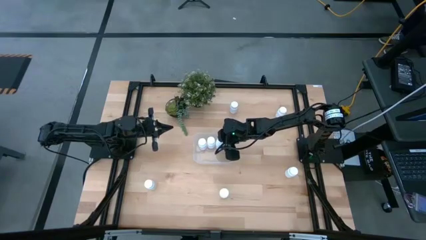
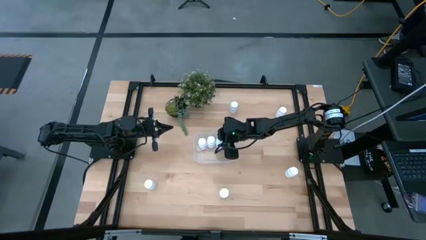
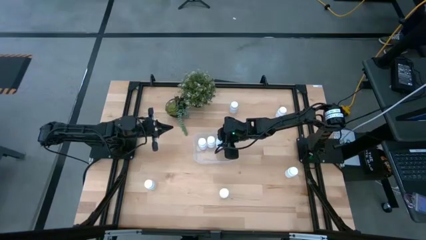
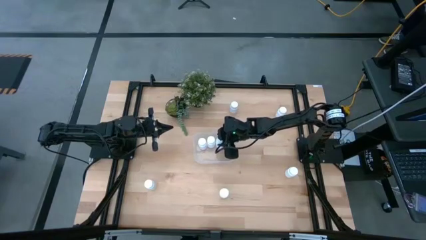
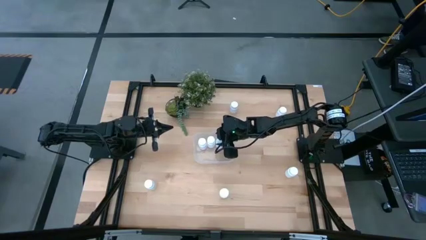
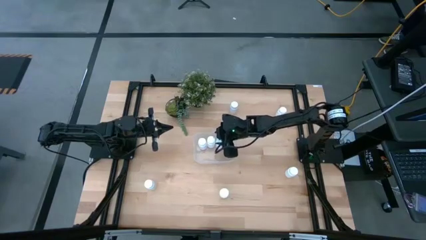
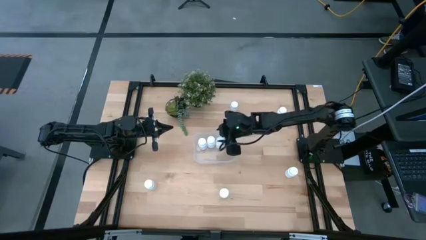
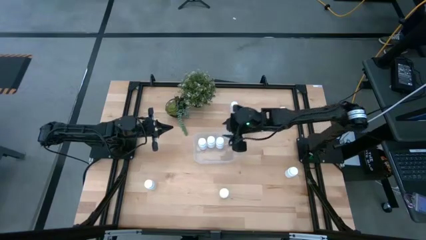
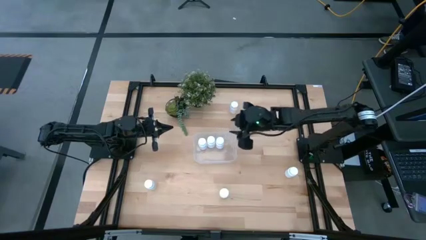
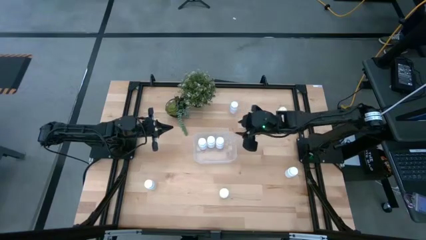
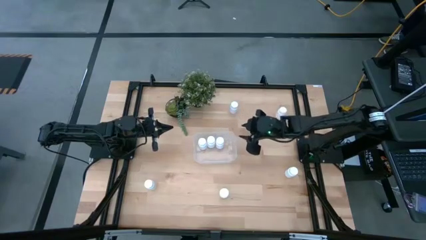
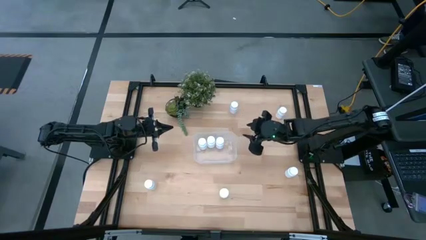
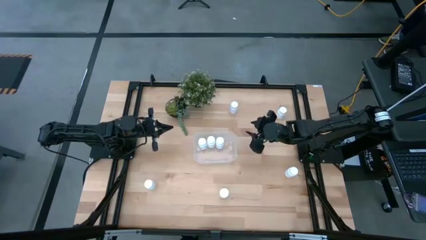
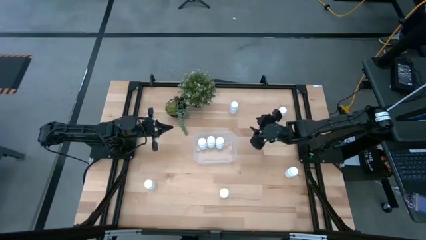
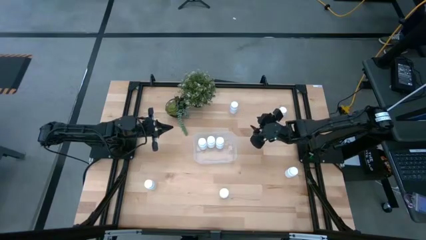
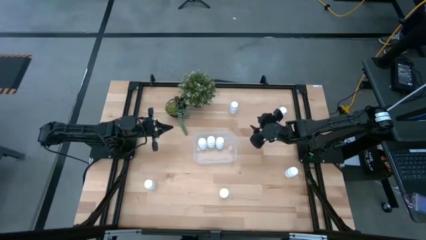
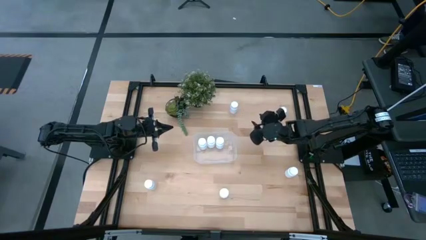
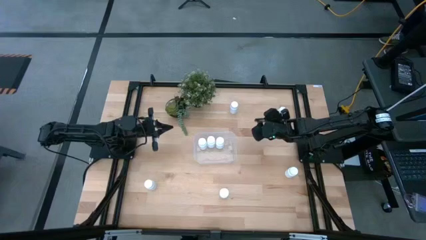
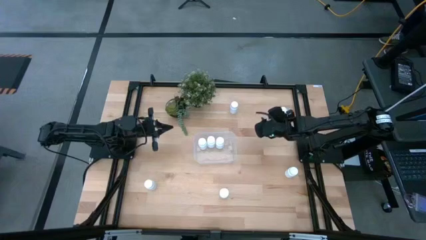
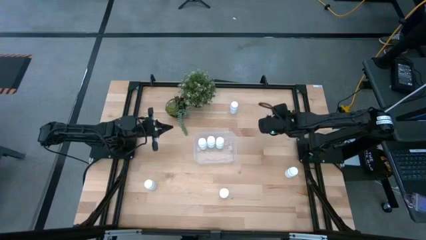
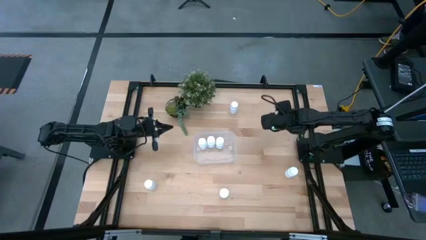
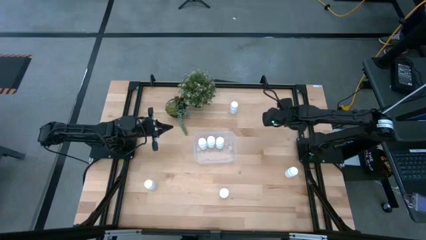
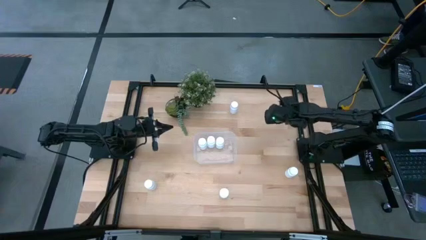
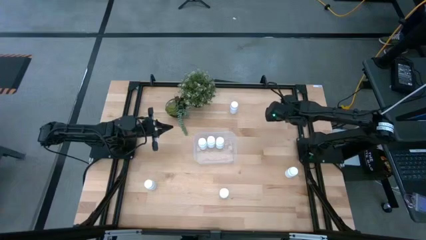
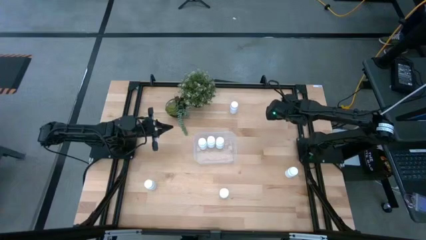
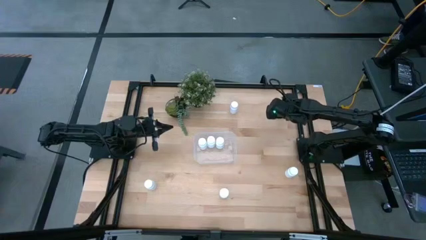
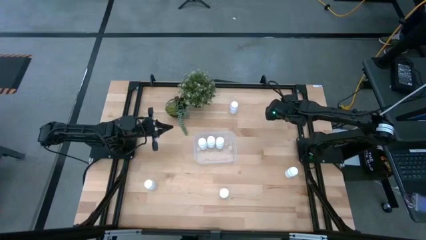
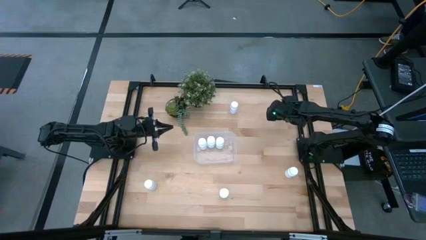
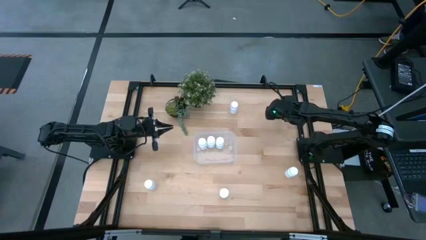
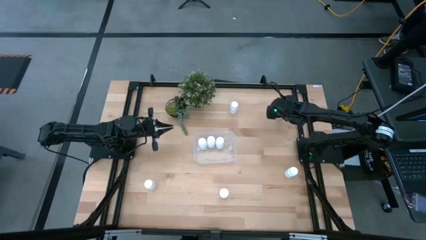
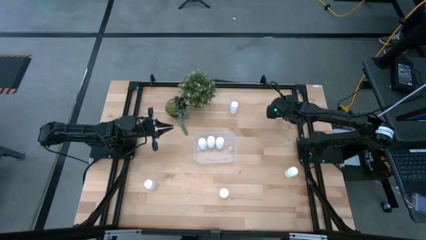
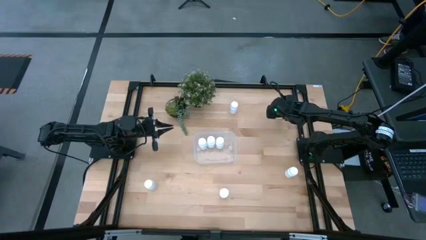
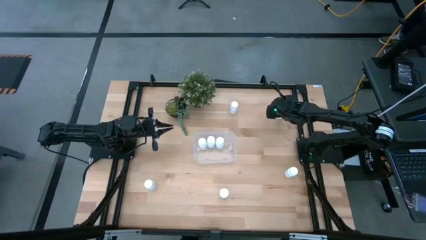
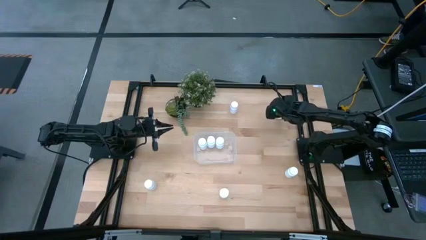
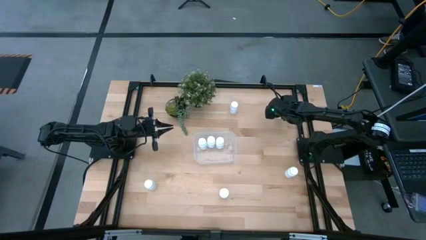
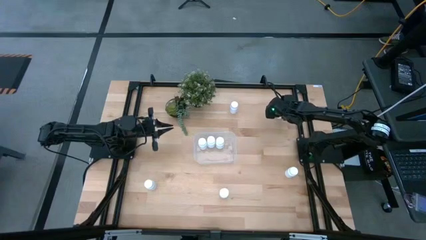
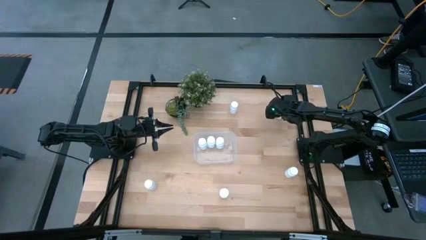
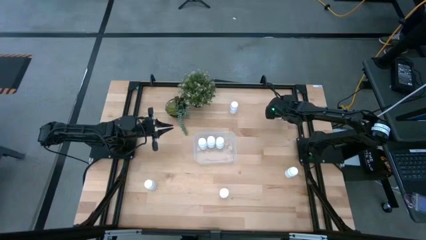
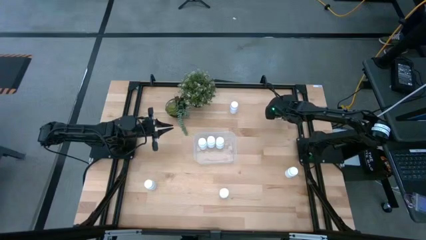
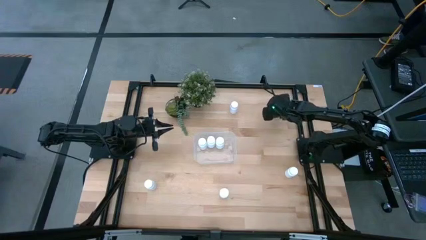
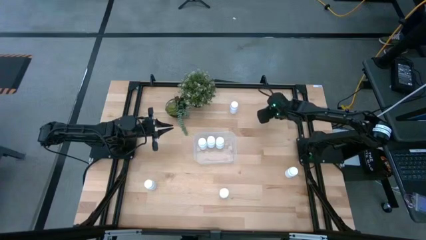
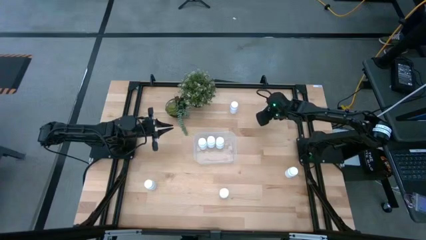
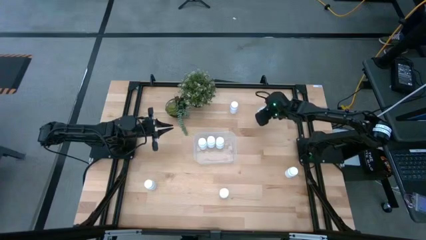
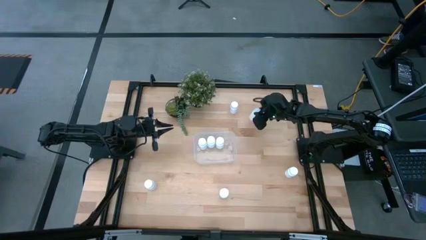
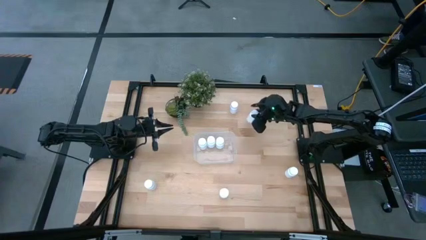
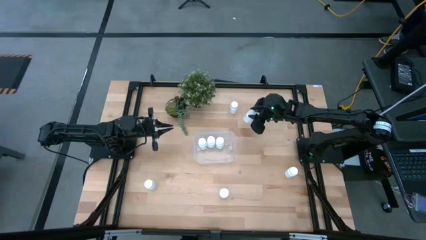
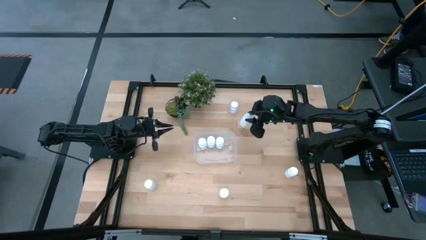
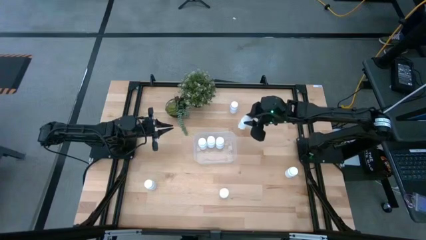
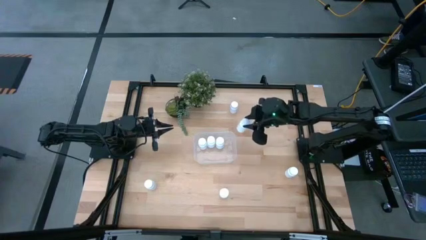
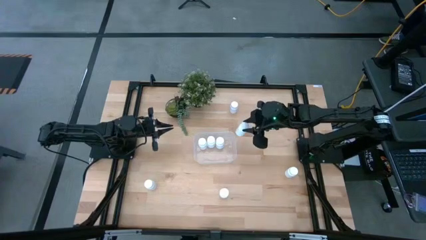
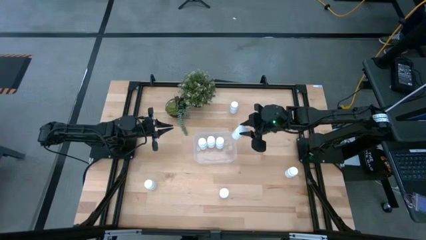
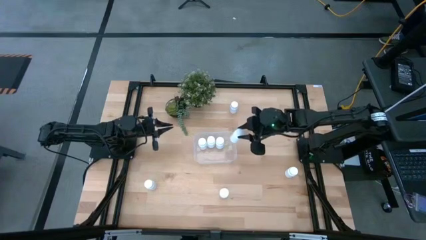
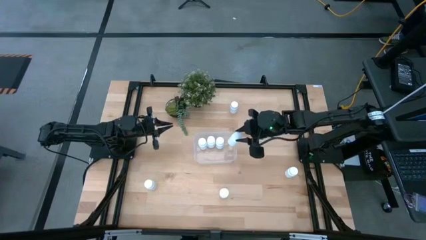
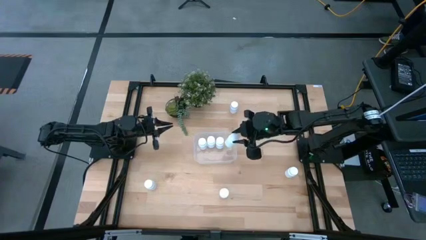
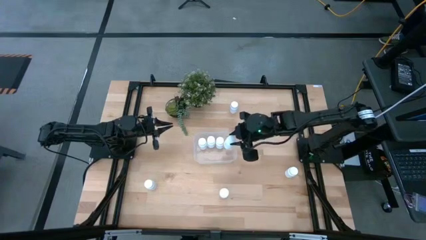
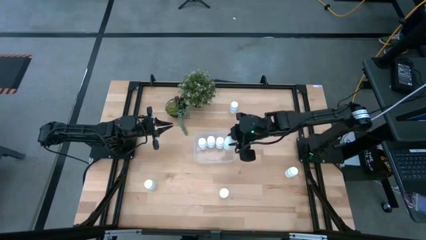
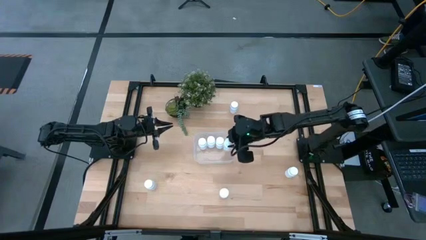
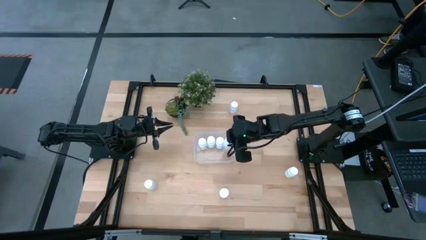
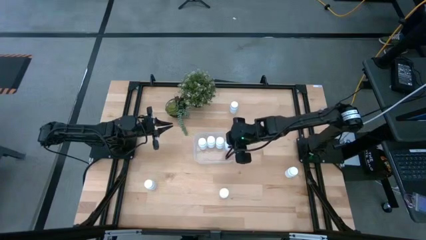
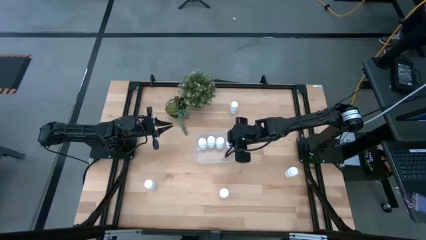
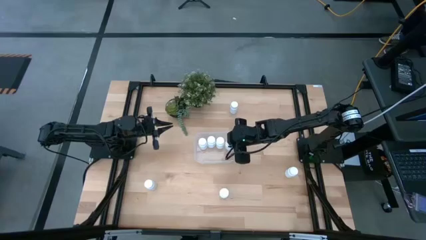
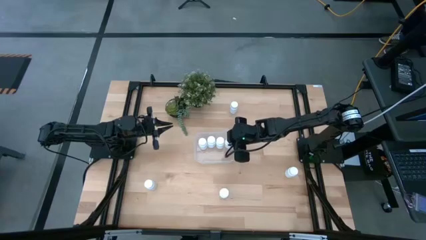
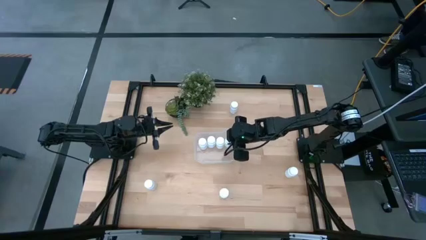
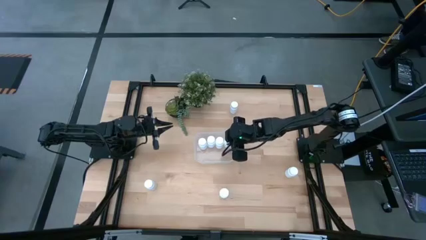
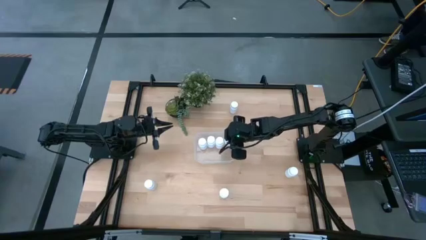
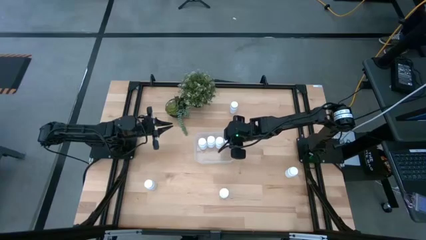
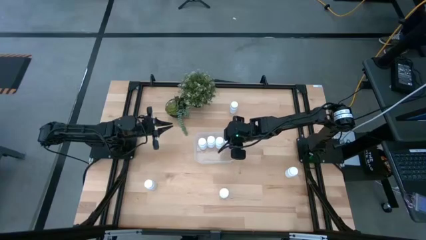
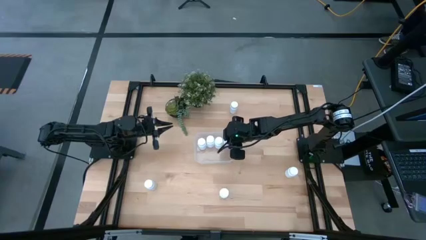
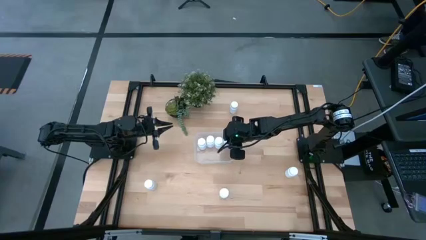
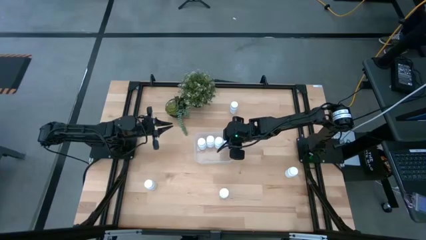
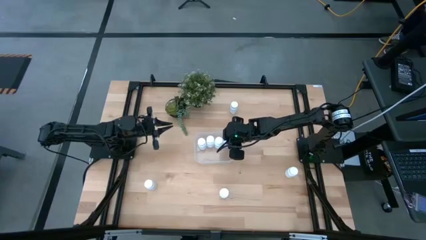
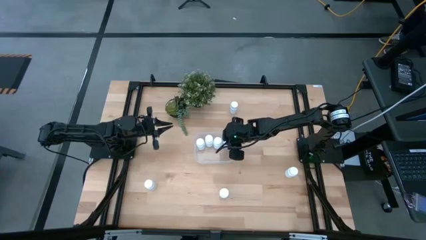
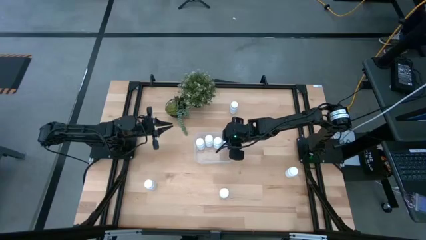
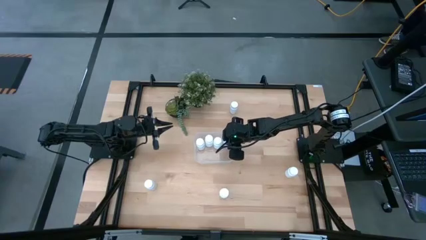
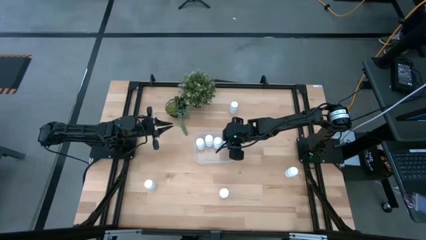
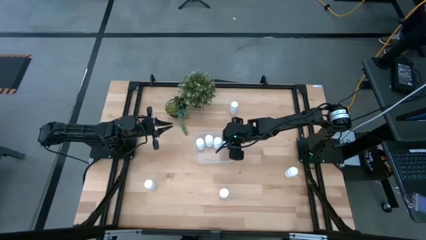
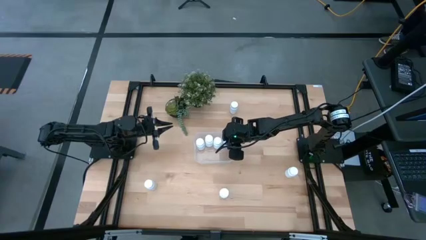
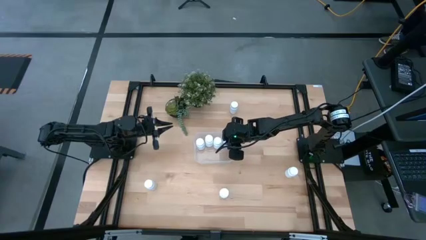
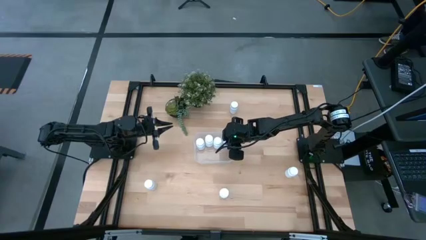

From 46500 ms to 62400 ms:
Task: Pick and place pill bottles into a basket
Put the pill bottle into the bin
